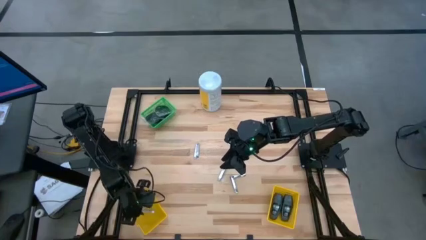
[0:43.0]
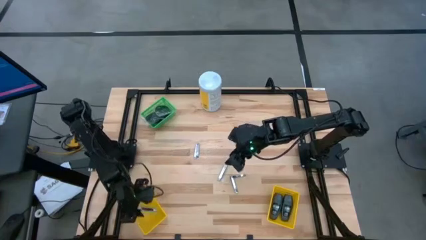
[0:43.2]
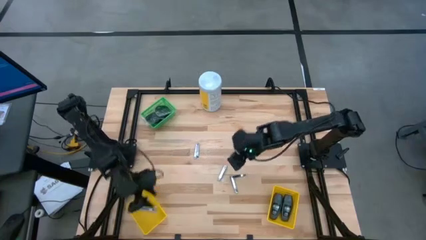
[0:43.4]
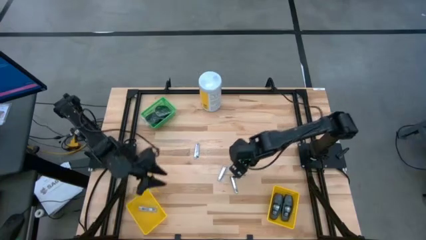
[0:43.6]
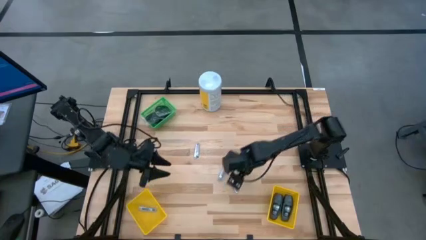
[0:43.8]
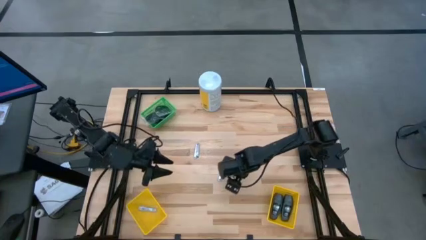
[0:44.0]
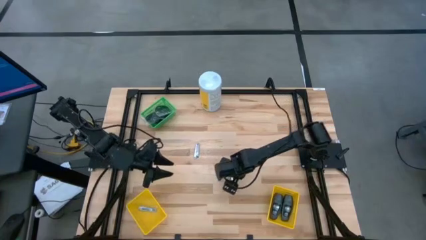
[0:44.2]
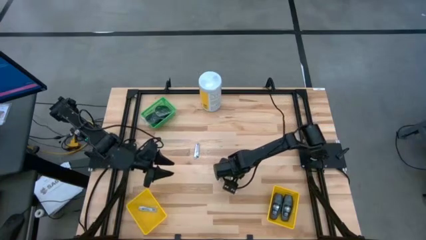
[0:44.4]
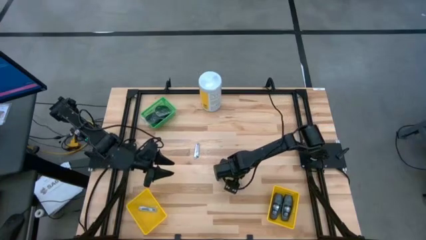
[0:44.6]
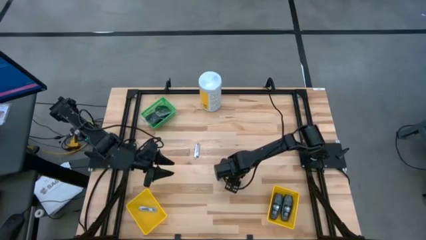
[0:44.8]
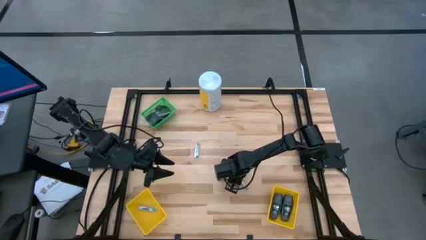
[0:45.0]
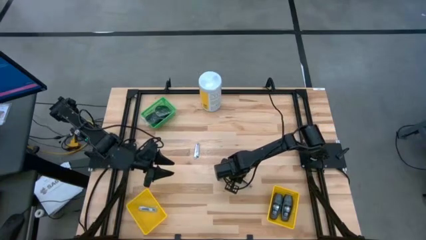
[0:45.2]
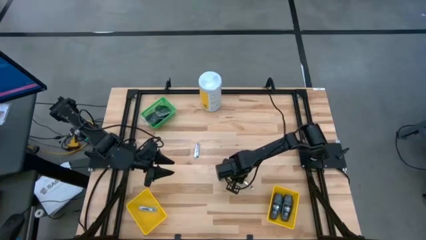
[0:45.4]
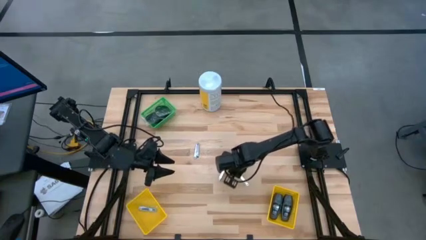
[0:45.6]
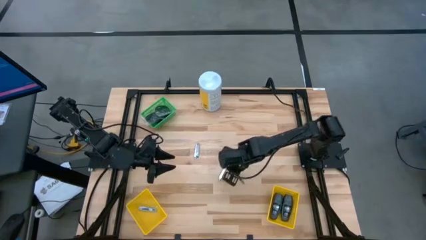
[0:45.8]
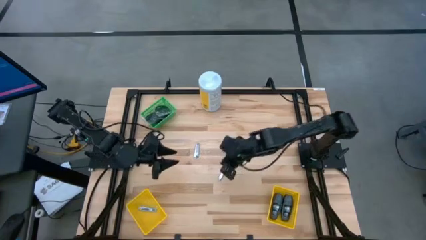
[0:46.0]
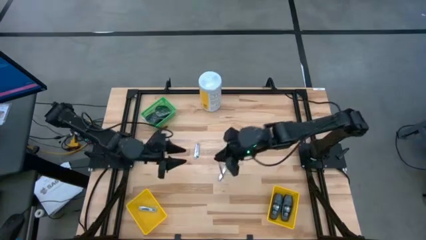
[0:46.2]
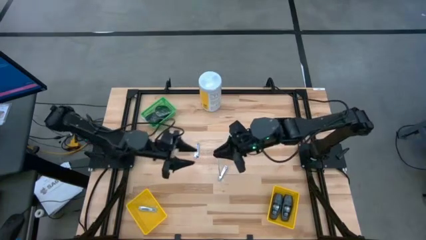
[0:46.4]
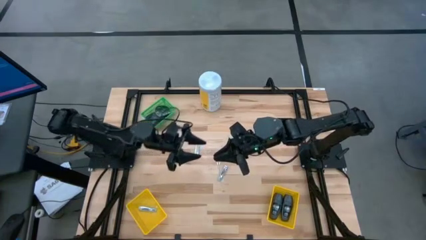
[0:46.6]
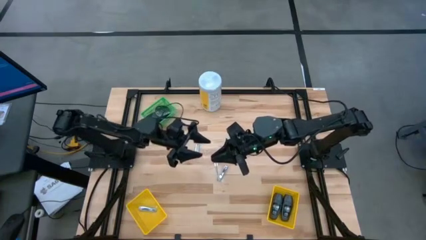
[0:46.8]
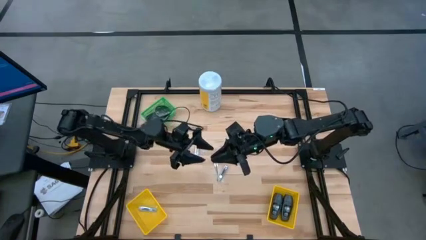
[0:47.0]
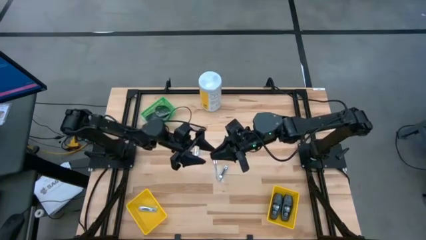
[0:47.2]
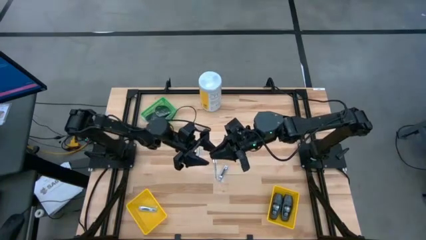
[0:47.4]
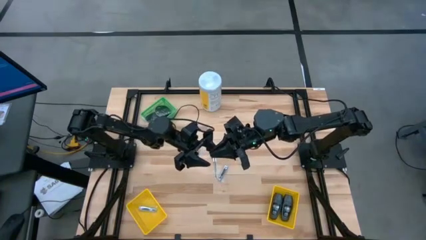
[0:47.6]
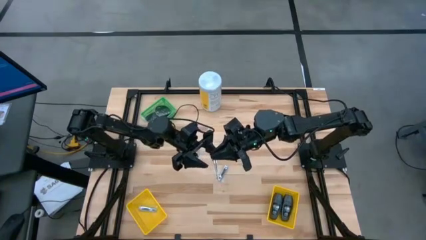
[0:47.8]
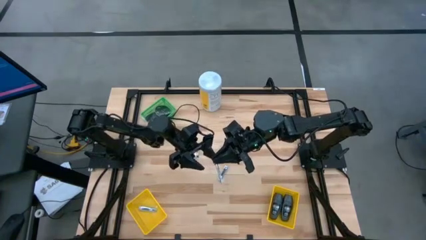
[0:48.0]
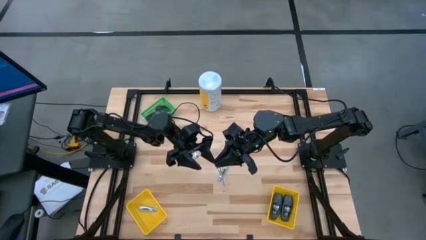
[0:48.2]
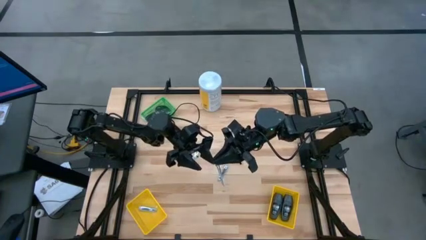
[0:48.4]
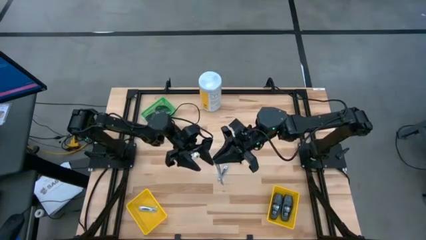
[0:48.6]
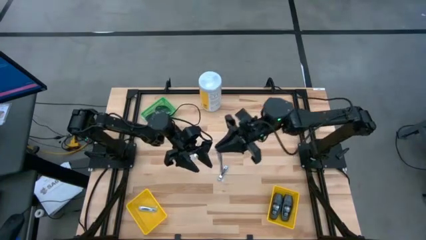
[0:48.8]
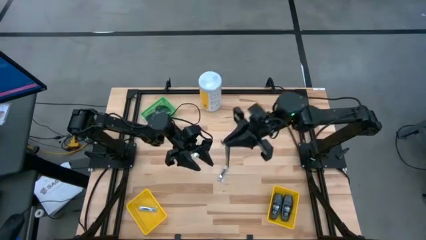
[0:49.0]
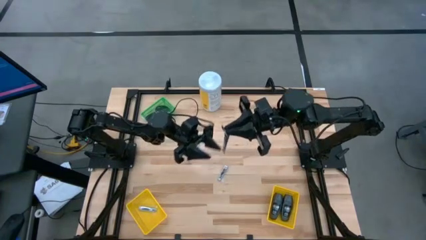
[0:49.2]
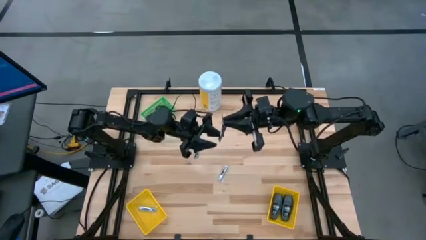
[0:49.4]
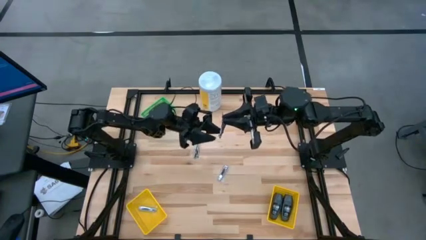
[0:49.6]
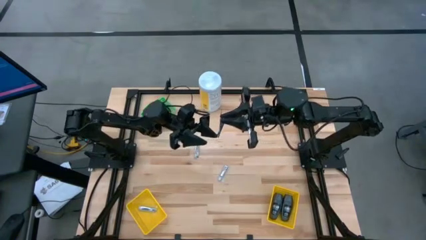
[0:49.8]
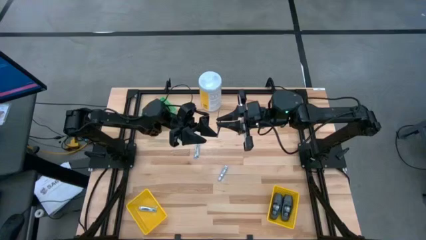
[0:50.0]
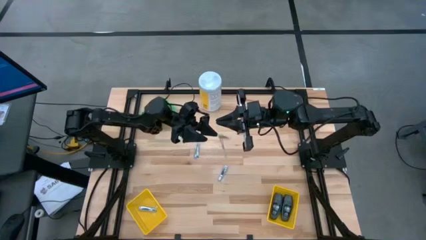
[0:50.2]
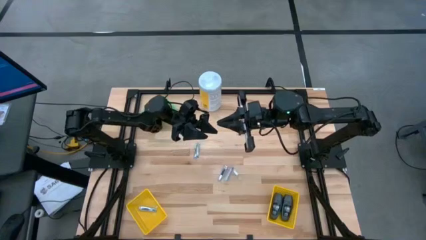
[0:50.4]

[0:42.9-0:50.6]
Task: Pick & Place Travel size toiletries
Put the nail cutter into the left yellow bin

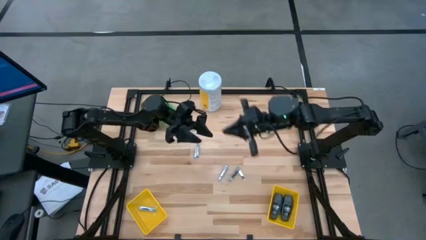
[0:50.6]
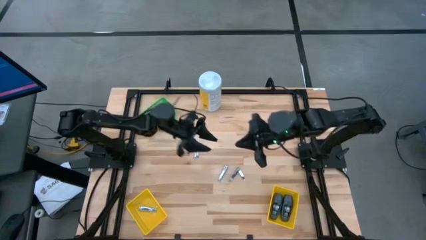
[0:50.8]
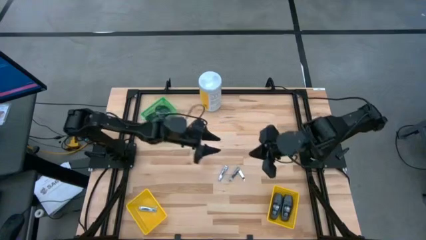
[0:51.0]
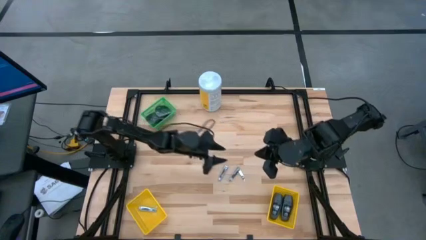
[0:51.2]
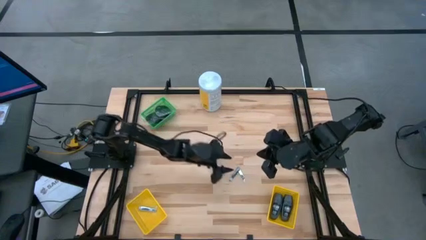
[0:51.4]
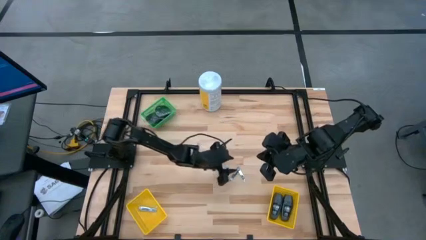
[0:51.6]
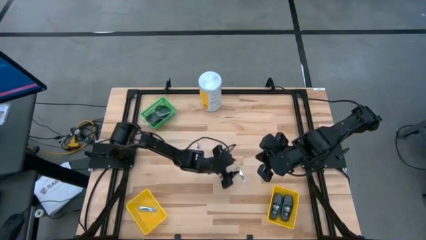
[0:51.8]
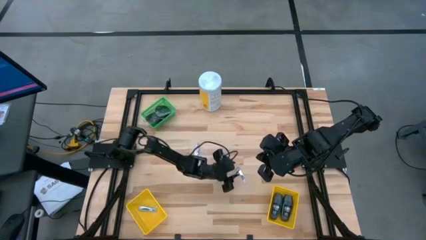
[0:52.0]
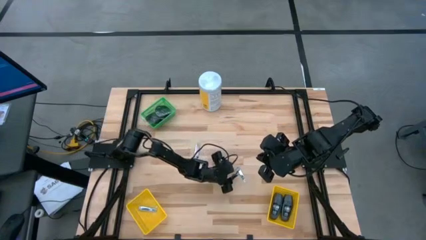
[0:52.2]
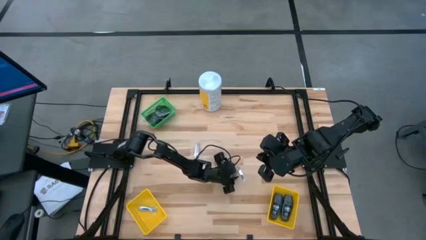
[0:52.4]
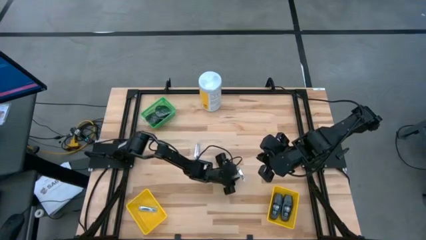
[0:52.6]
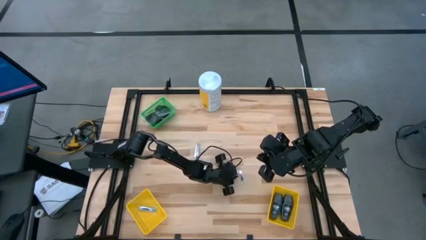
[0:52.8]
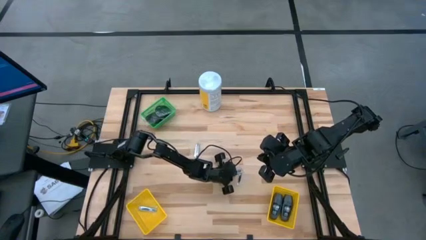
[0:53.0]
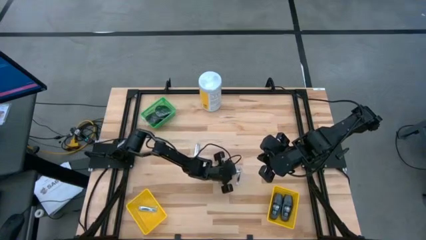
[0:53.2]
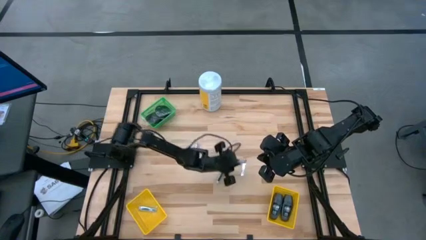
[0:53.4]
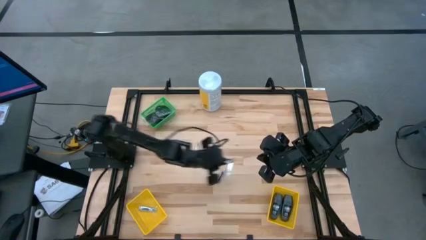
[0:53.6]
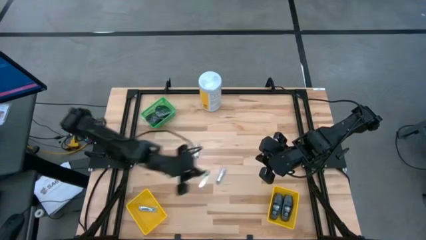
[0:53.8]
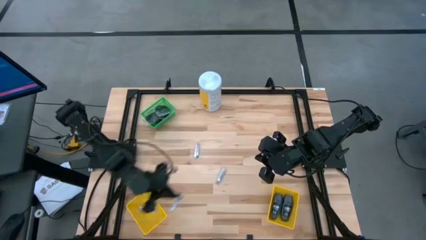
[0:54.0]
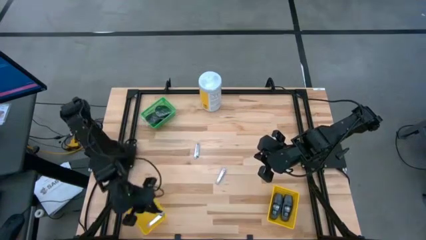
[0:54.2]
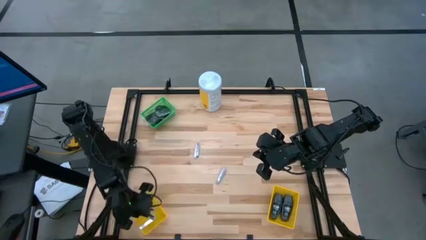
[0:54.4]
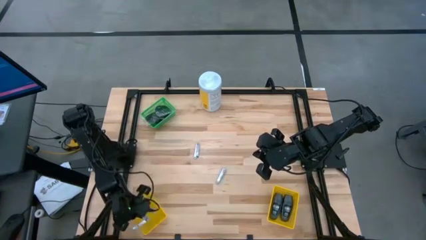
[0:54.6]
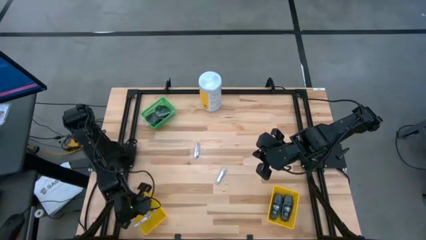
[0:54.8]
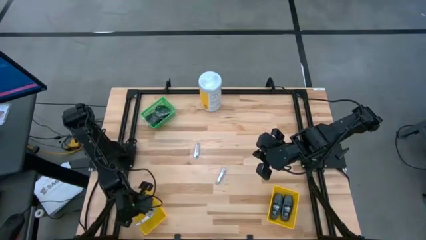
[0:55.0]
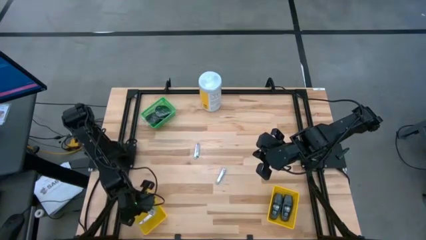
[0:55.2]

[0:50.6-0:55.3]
Put the nail cutter into the left yellow bin

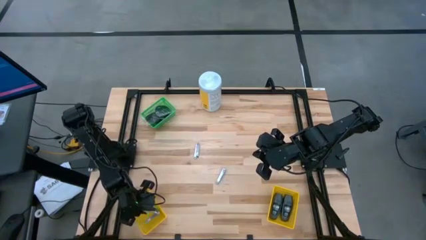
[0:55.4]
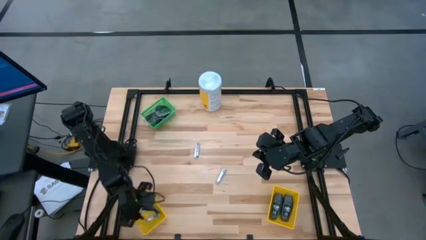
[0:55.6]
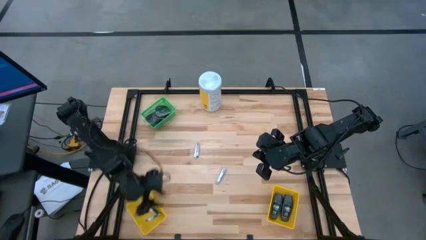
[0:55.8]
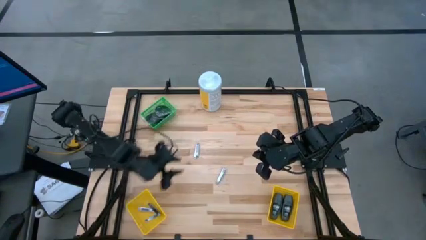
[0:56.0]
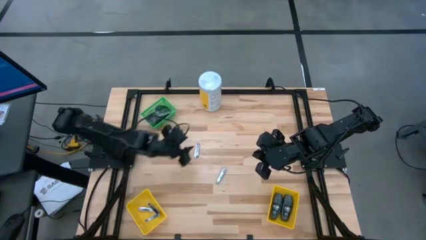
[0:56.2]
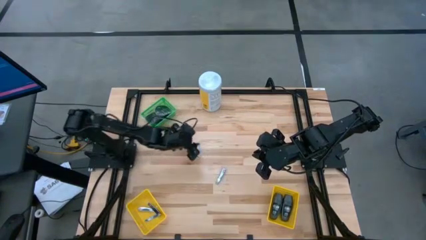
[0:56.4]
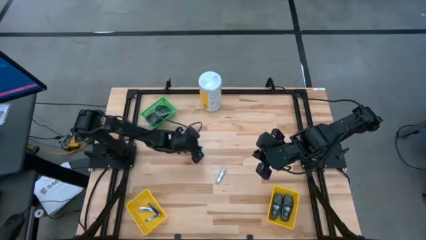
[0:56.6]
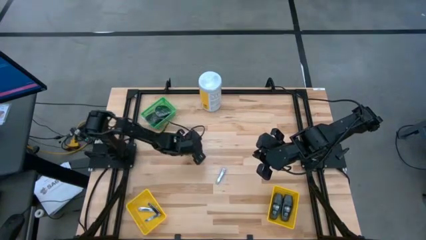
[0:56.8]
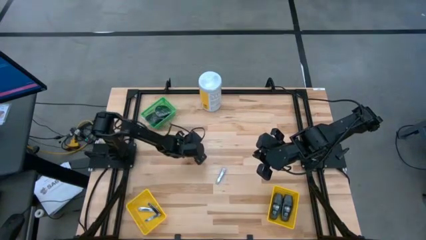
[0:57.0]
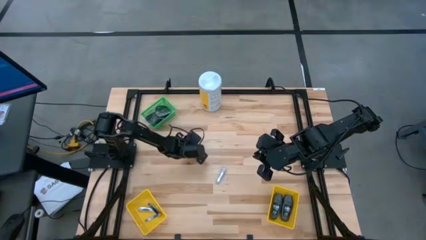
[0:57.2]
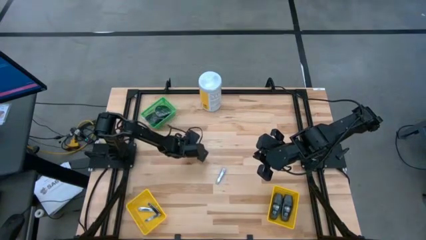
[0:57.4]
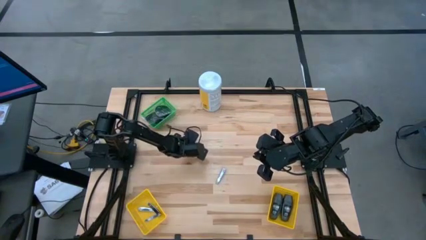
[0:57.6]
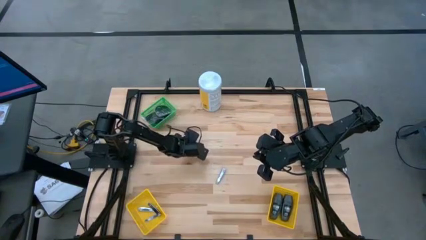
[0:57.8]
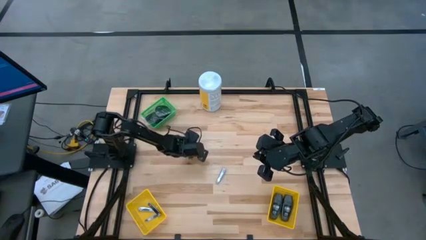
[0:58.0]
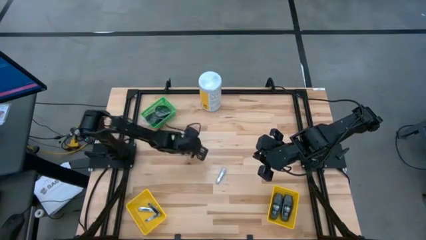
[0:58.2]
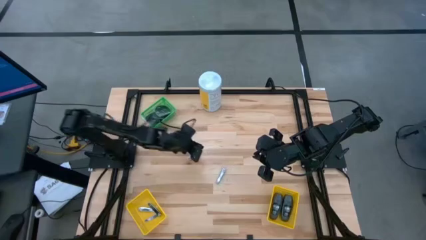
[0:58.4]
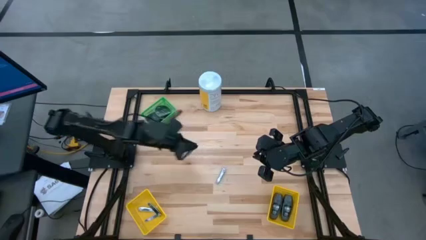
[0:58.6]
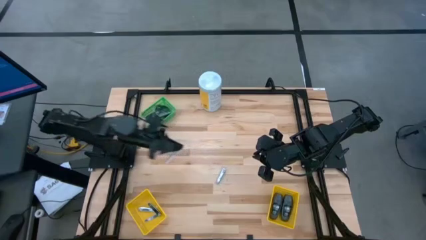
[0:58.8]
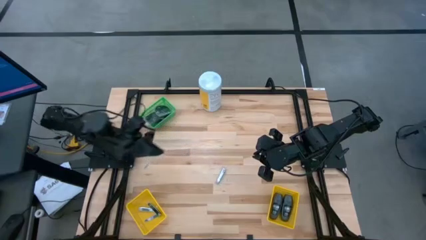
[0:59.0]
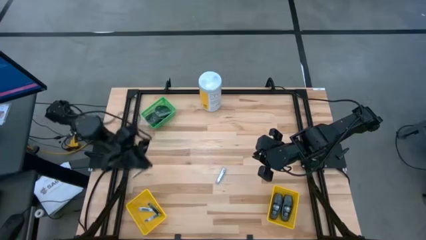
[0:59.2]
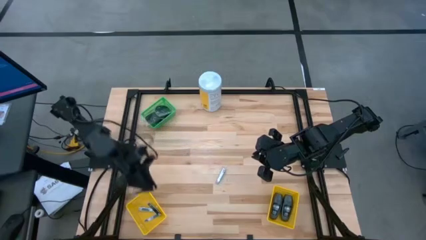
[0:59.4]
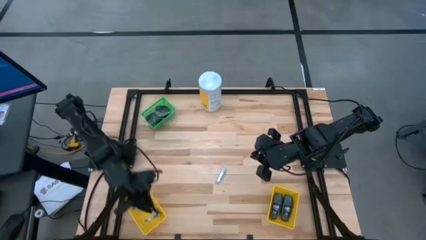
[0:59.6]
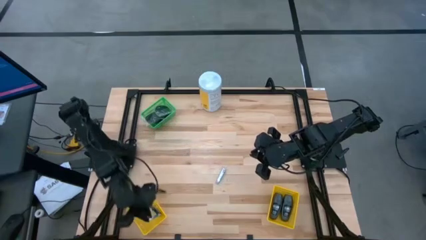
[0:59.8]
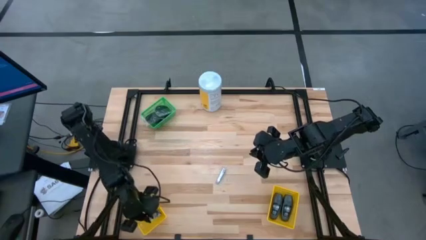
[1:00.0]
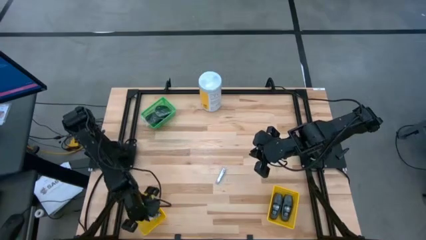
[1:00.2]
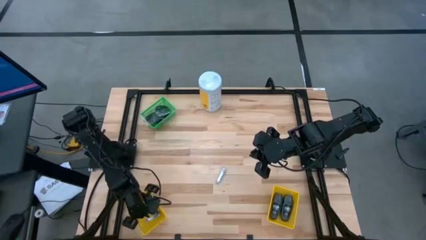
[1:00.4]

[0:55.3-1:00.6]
Put the nail cutter into the left yellow bin
